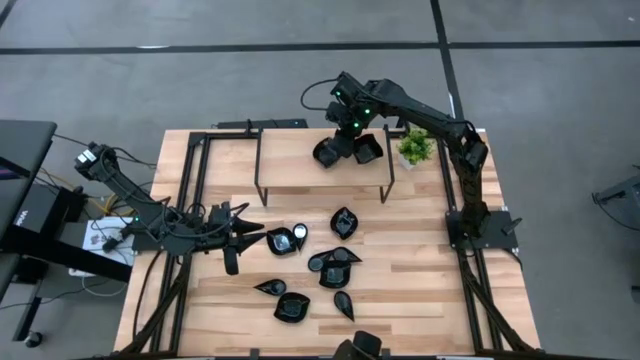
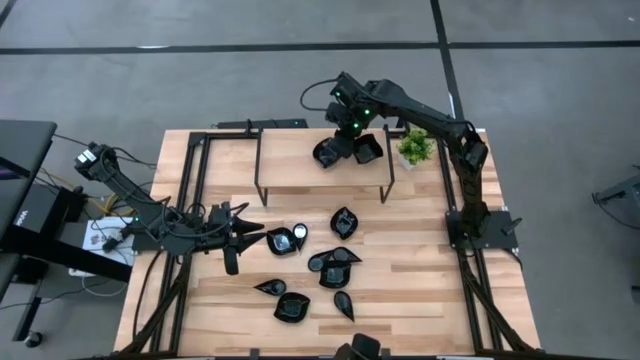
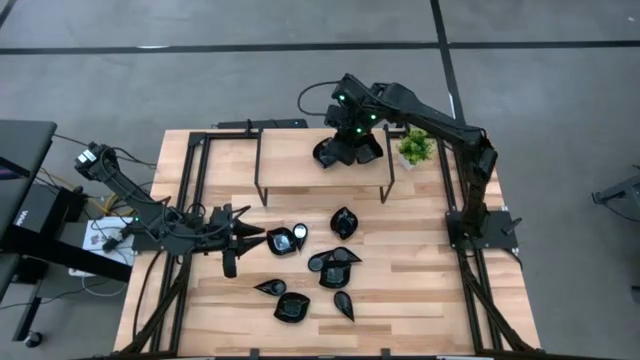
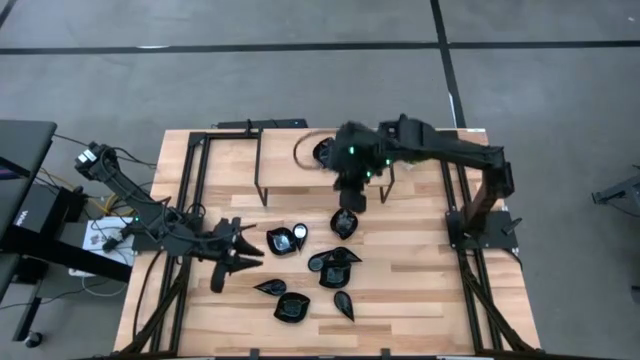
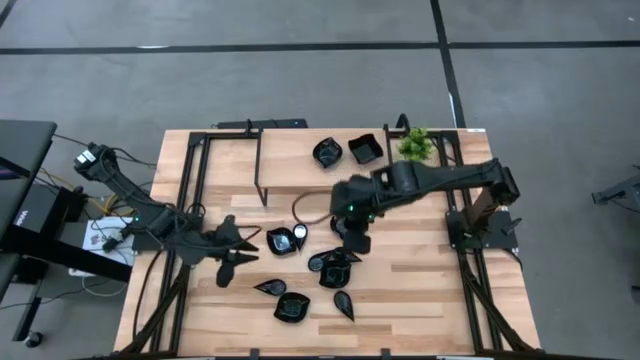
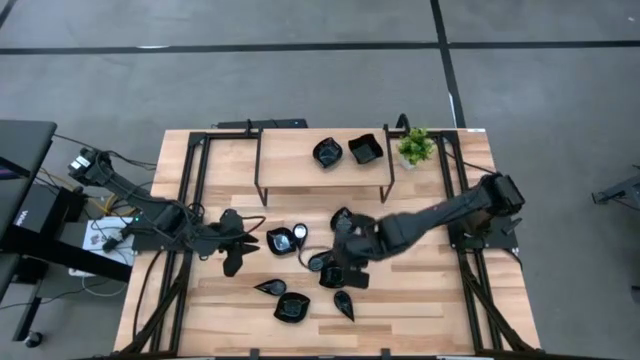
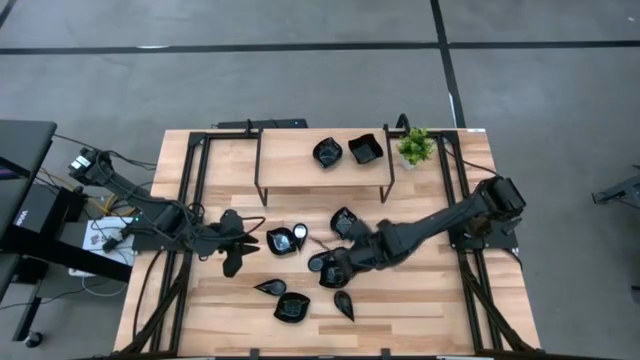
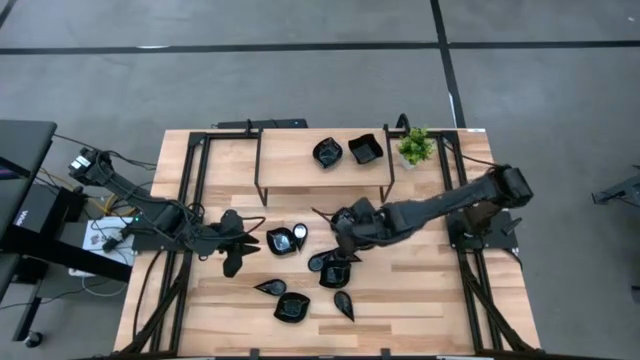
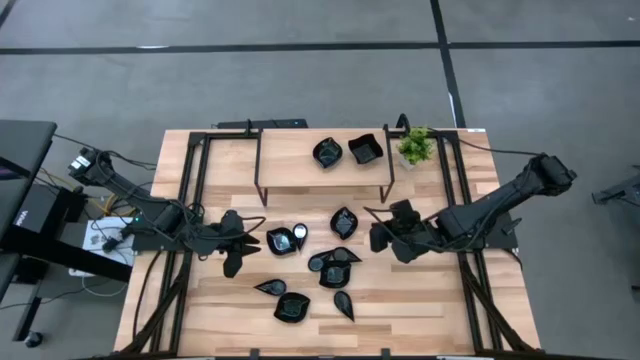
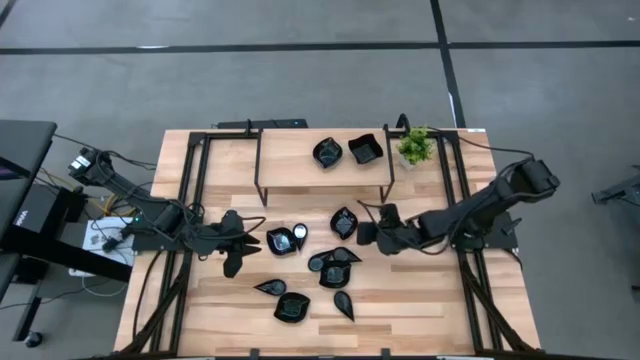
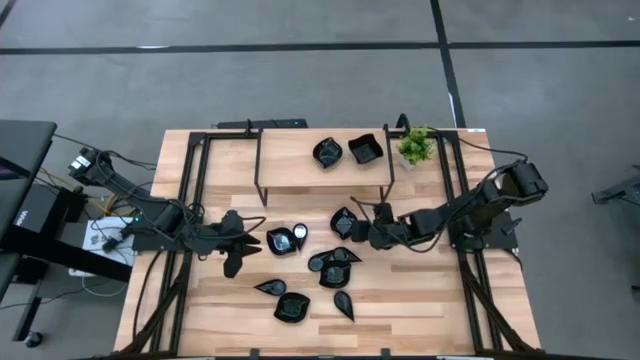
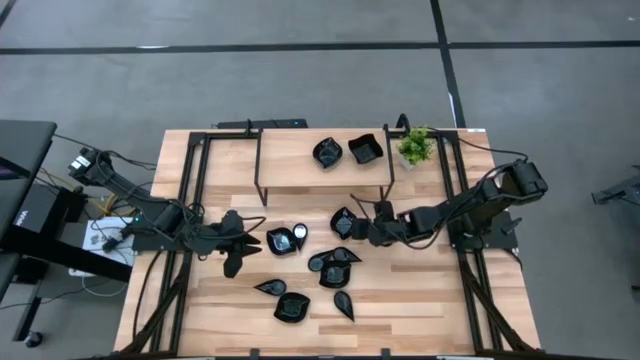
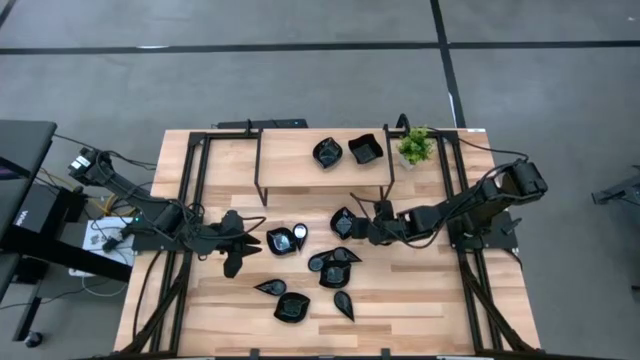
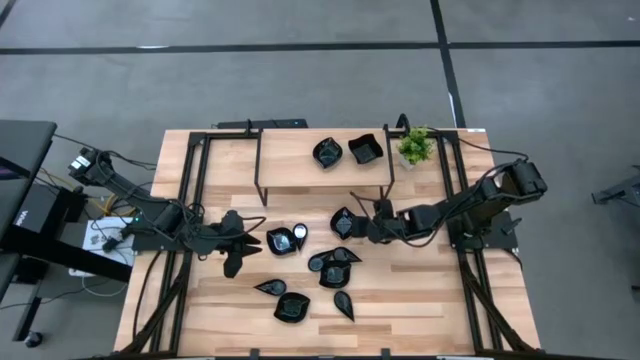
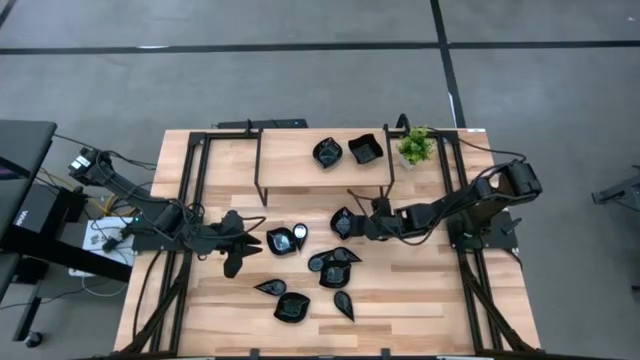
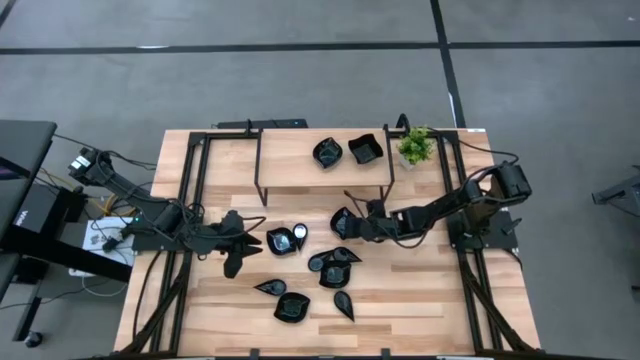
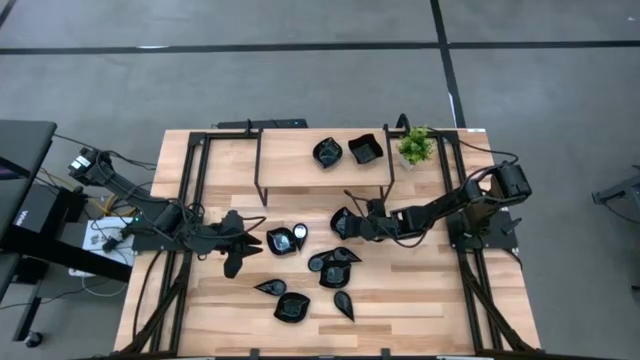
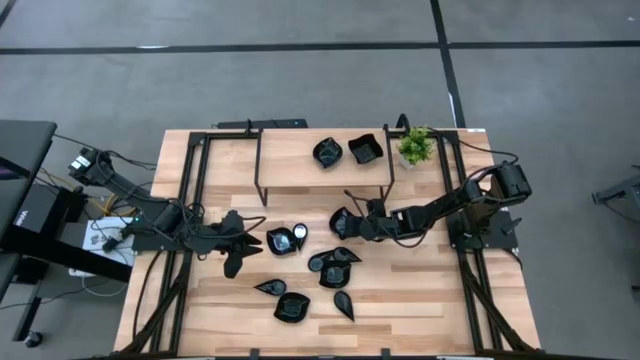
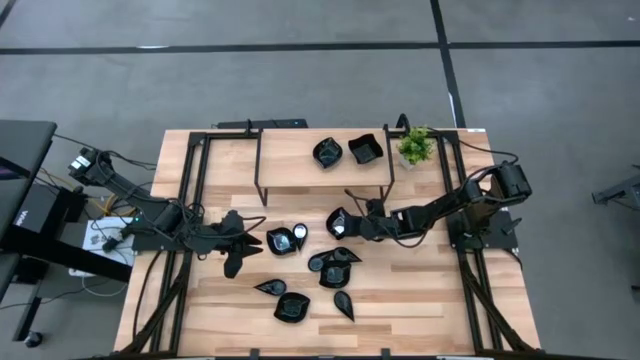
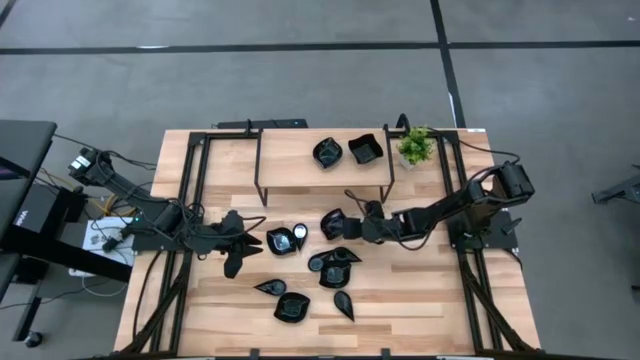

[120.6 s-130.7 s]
Task: Pick & Place Mini shaped plates
Stack the black leaf shaped plate on the black leaf shaped plate on the shelf

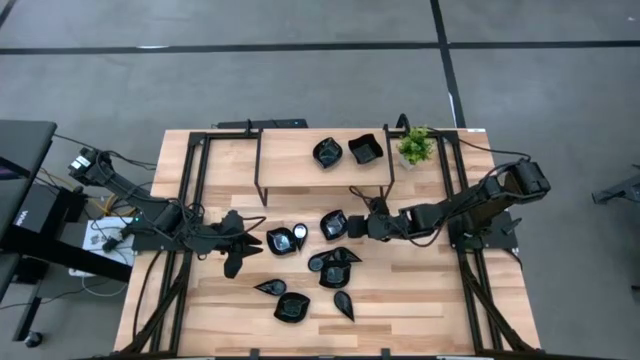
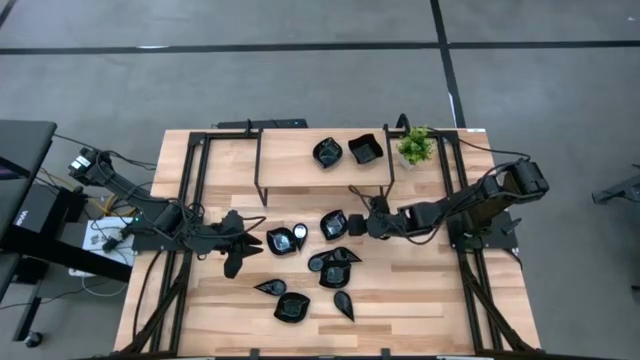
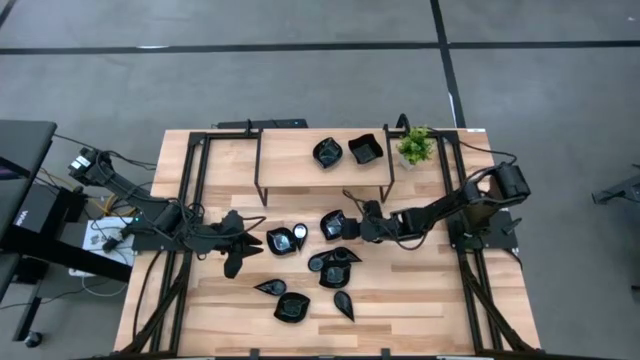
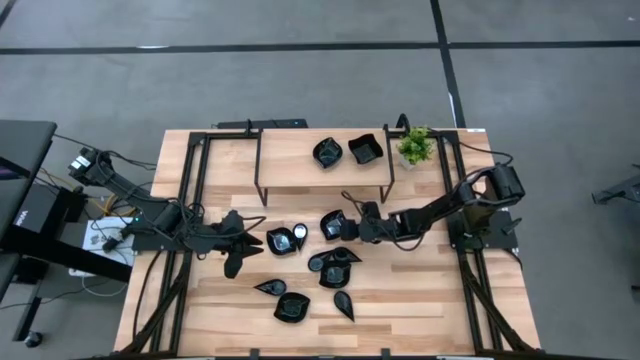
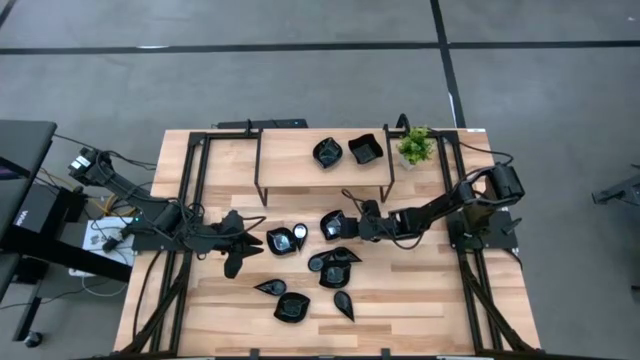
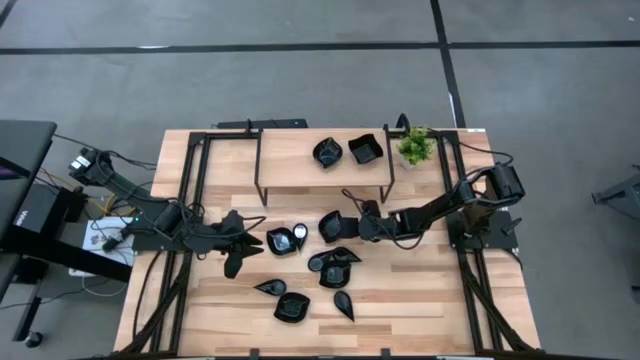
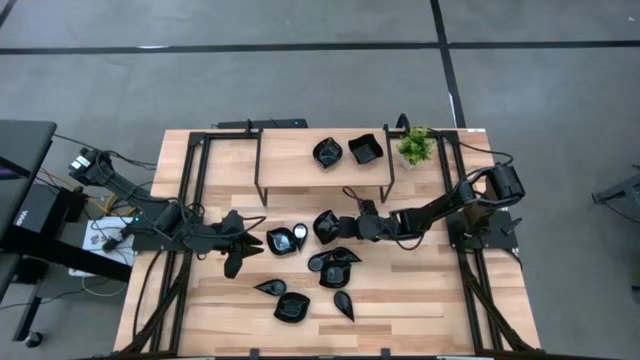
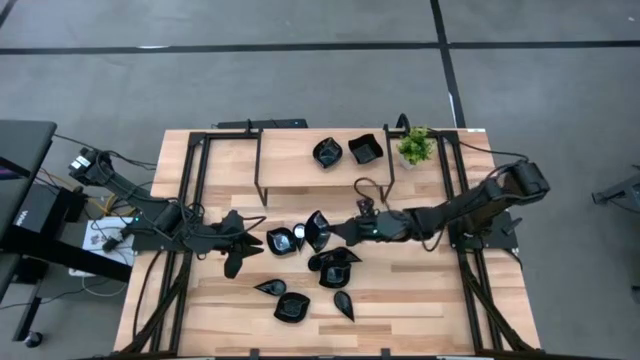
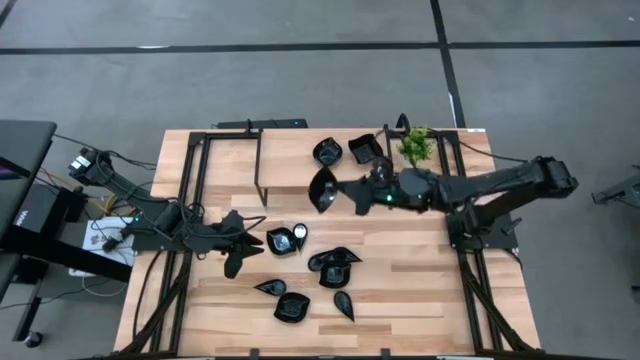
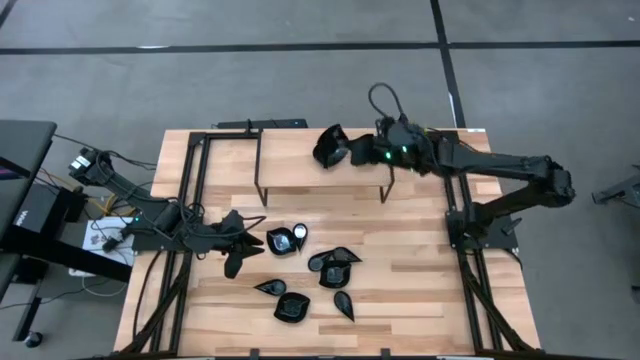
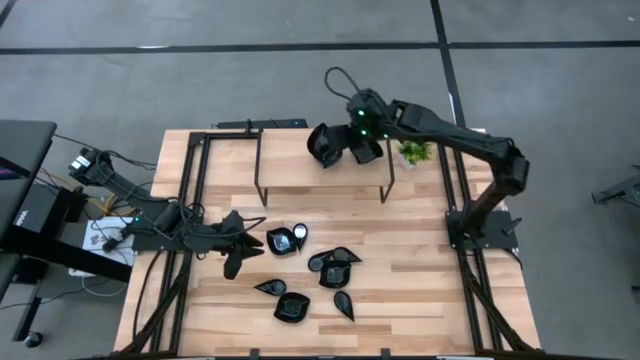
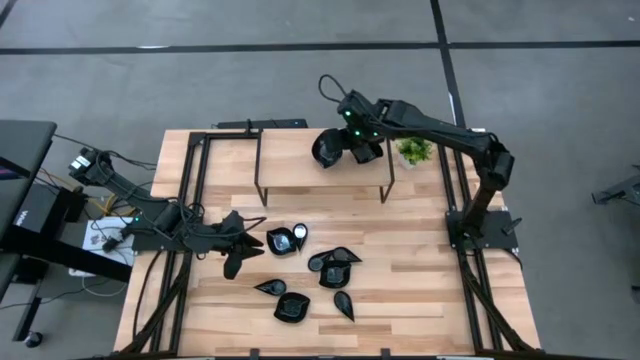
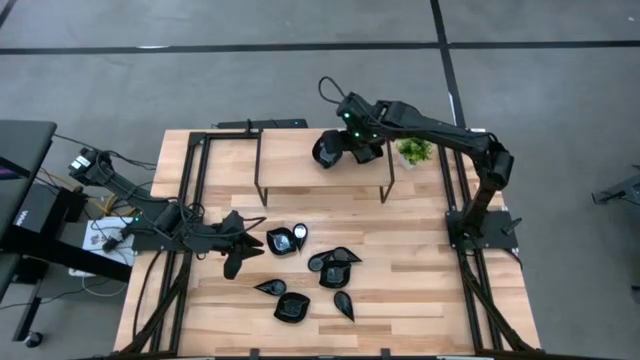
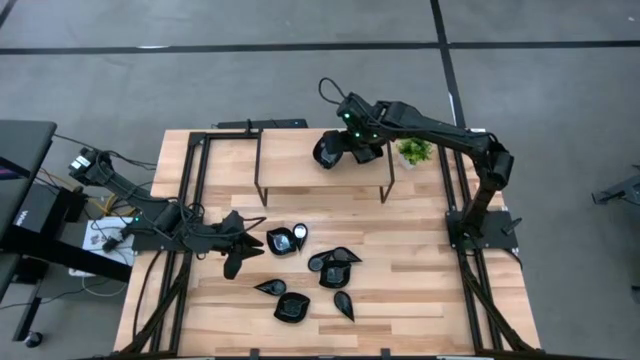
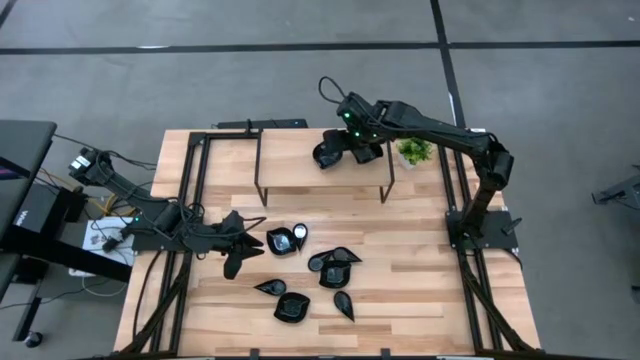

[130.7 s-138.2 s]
Stack the black leaf shaped plate on the black leaf shaped plate on the shelf

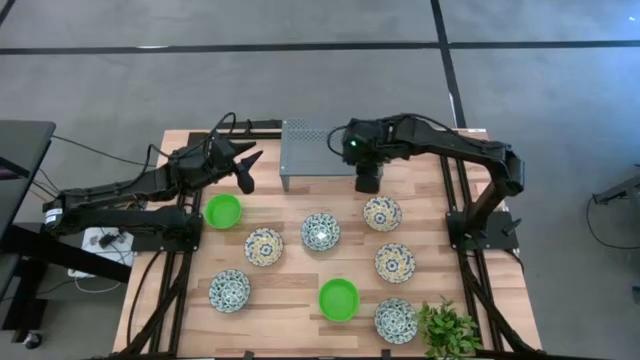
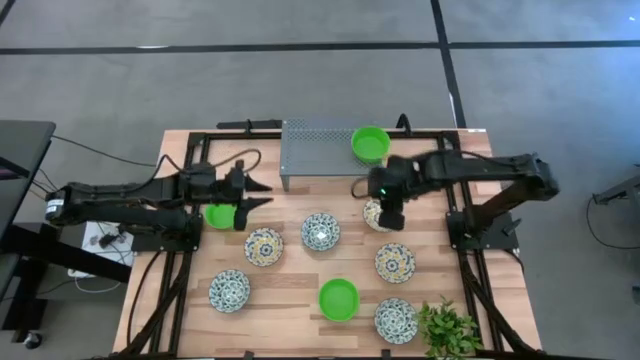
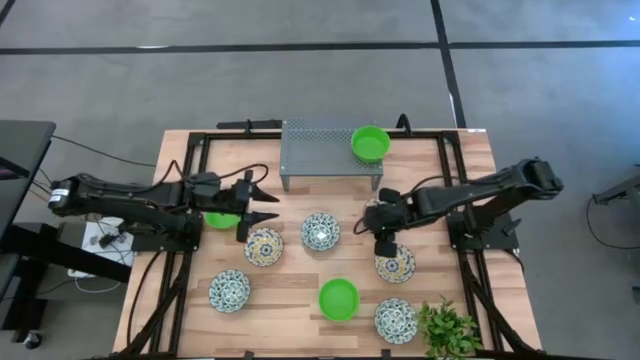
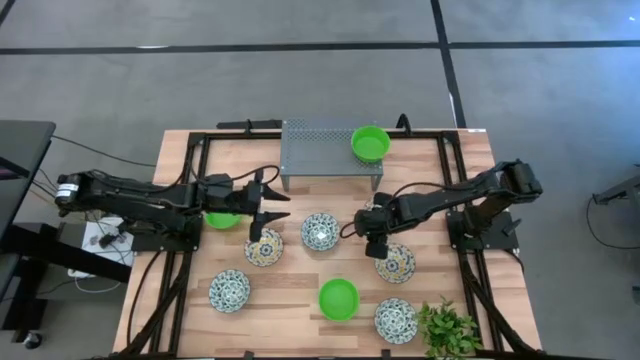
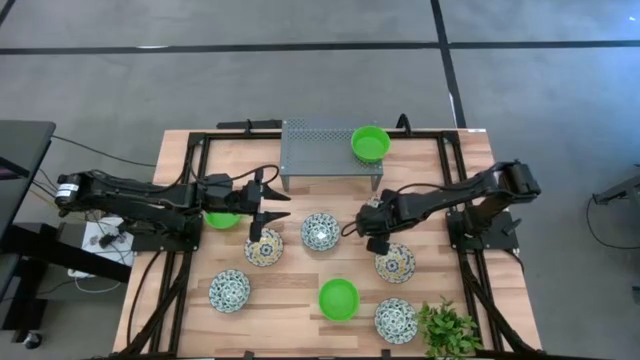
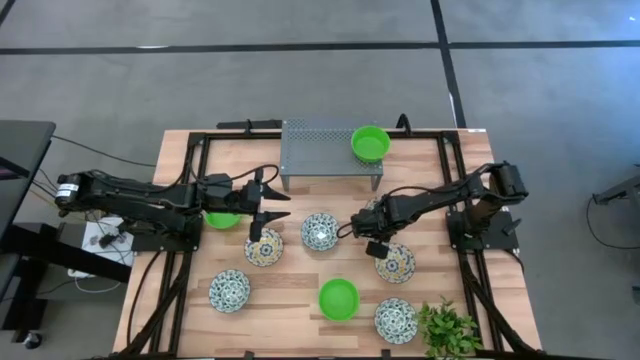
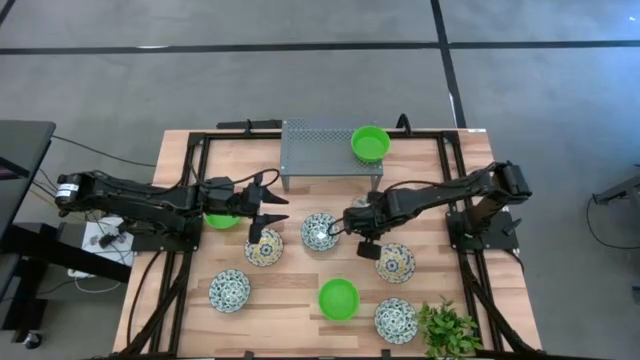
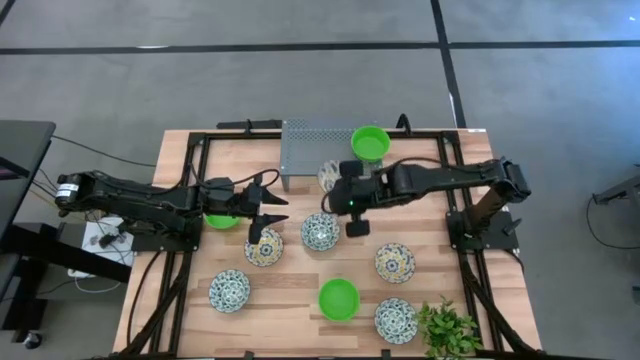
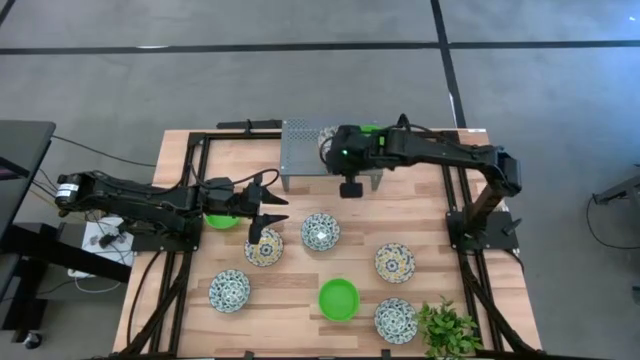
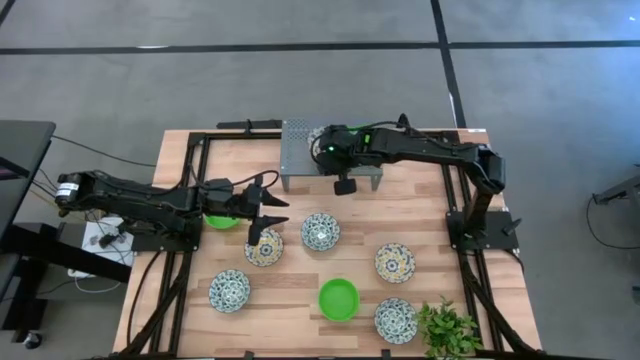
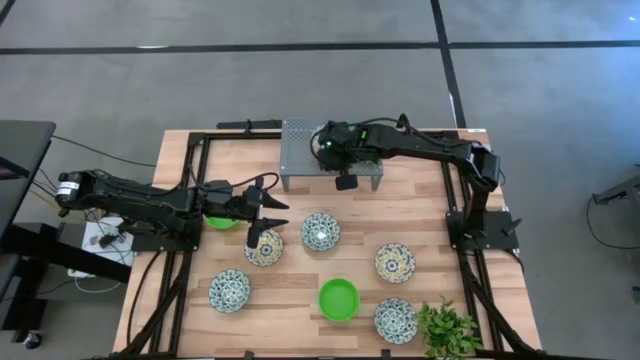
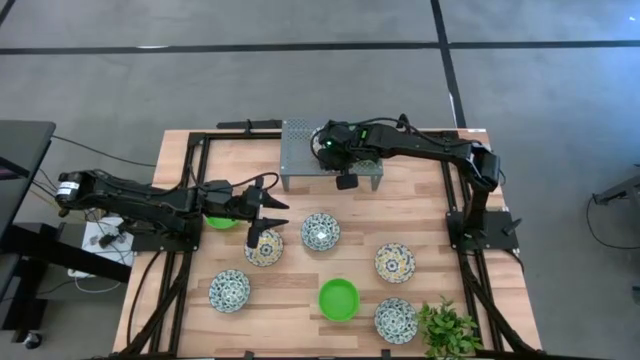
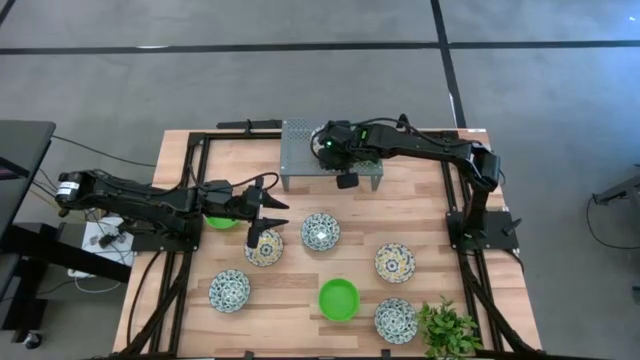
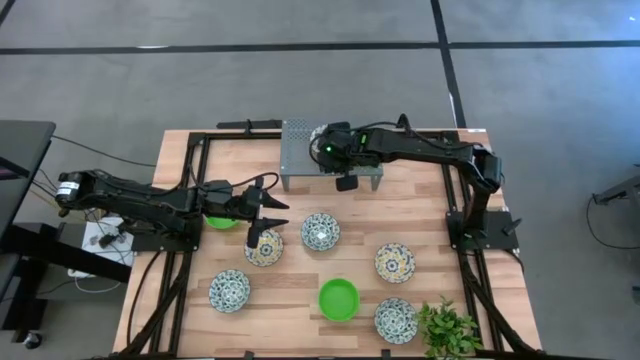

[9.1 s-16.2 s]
Task: Pick & Place Mini bowls
Put the top right yellow patterned bowl on the shelf
